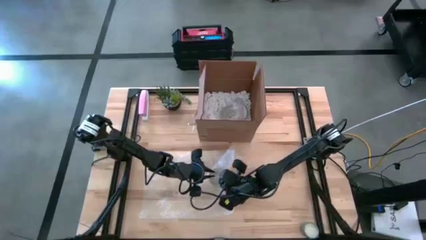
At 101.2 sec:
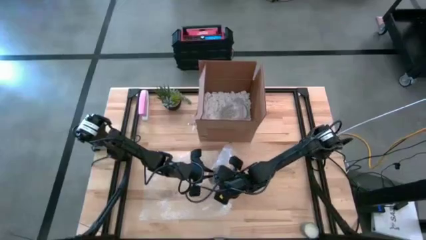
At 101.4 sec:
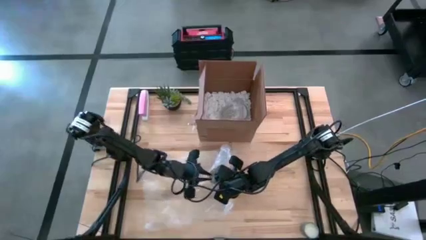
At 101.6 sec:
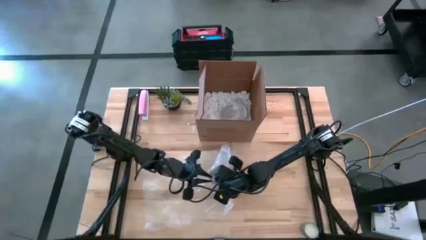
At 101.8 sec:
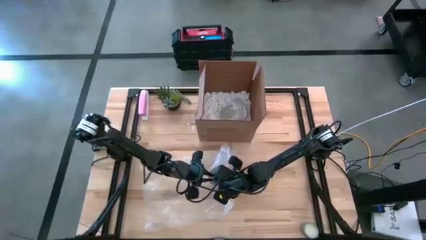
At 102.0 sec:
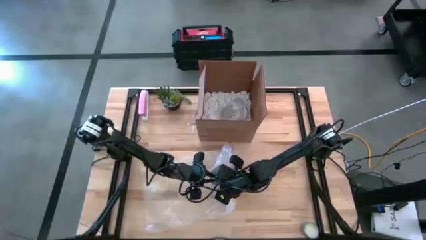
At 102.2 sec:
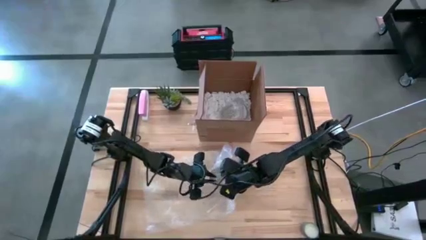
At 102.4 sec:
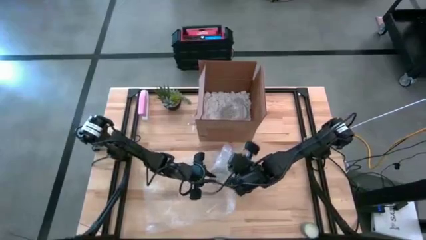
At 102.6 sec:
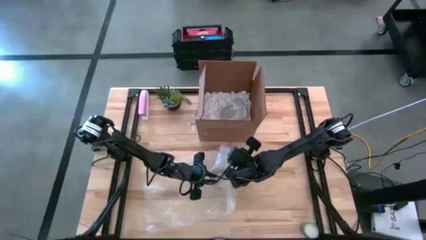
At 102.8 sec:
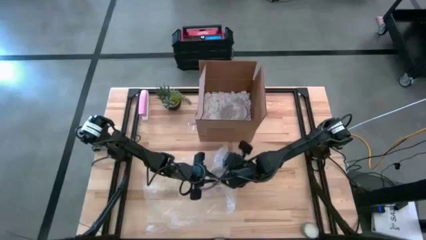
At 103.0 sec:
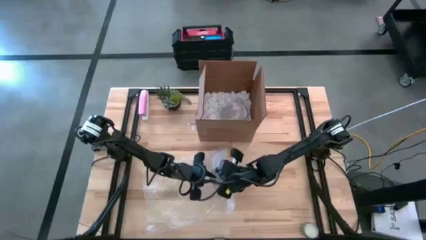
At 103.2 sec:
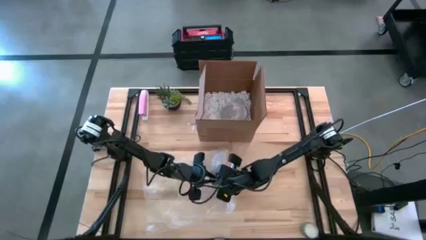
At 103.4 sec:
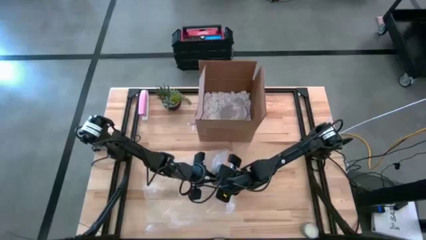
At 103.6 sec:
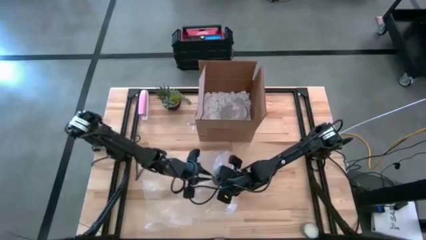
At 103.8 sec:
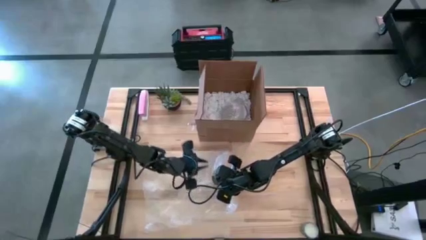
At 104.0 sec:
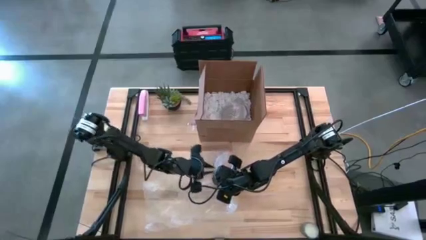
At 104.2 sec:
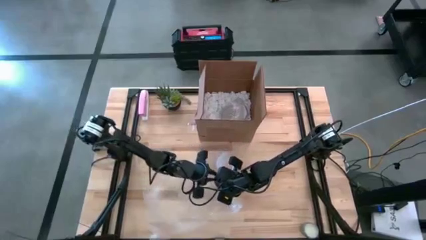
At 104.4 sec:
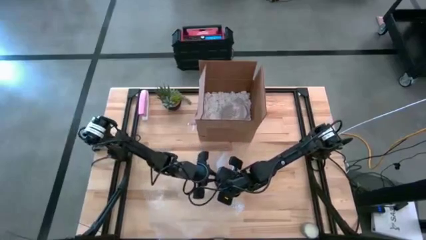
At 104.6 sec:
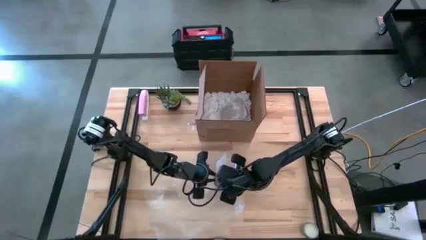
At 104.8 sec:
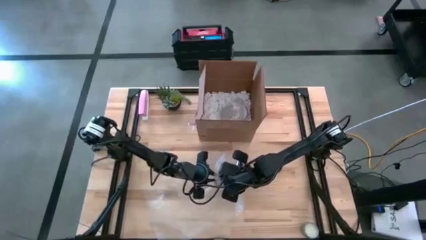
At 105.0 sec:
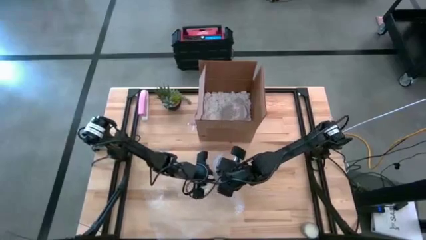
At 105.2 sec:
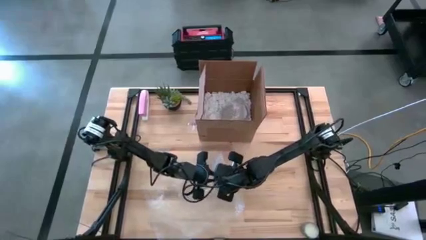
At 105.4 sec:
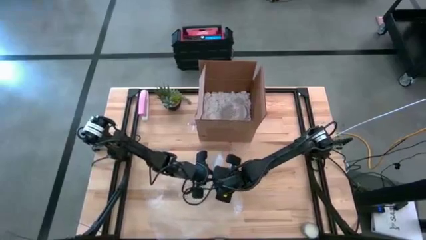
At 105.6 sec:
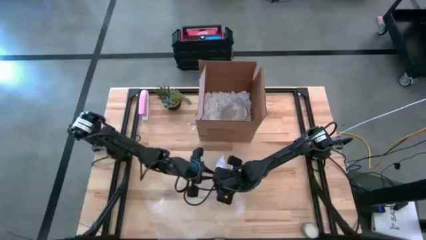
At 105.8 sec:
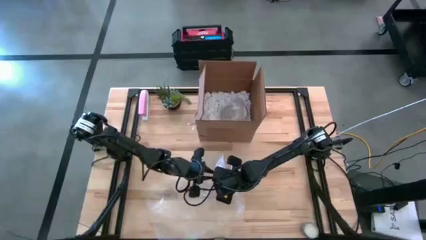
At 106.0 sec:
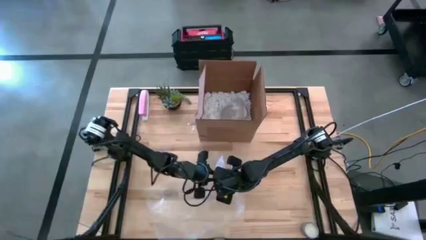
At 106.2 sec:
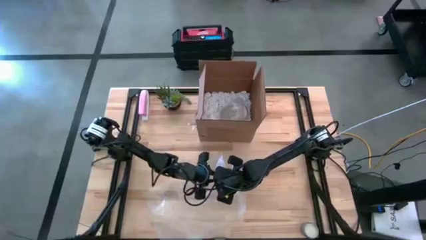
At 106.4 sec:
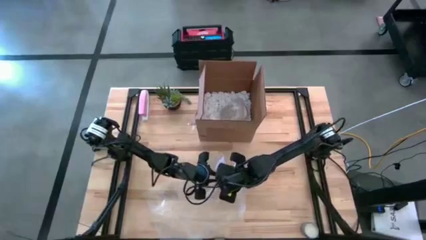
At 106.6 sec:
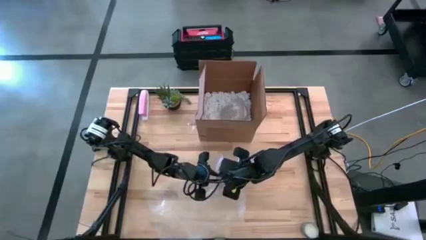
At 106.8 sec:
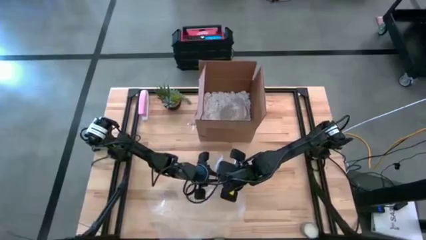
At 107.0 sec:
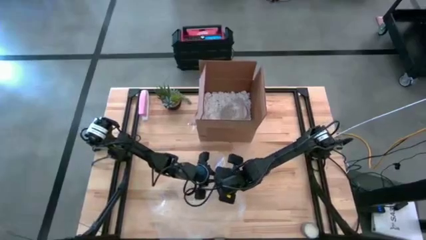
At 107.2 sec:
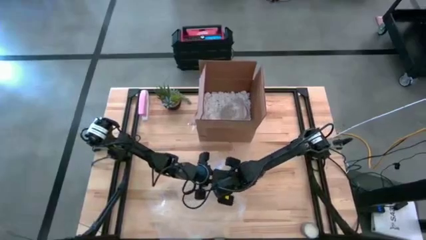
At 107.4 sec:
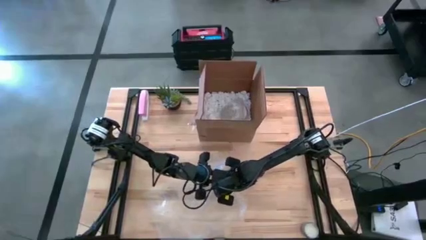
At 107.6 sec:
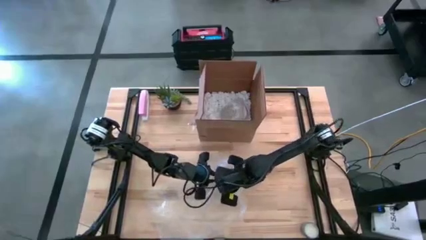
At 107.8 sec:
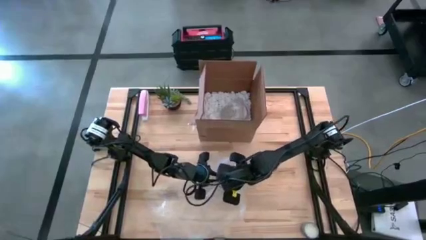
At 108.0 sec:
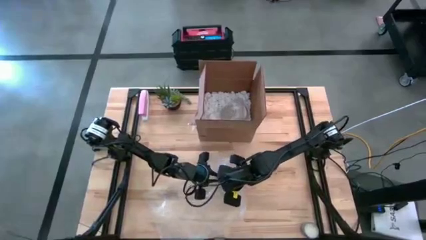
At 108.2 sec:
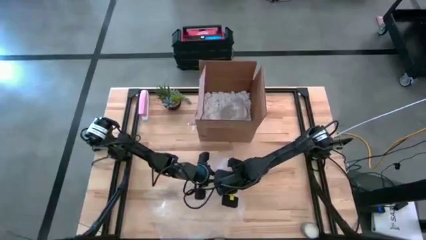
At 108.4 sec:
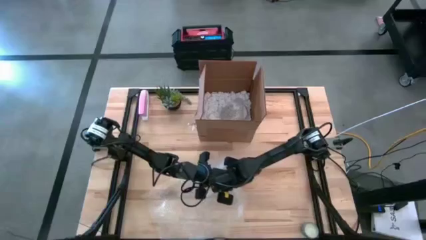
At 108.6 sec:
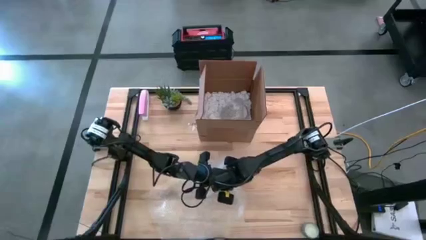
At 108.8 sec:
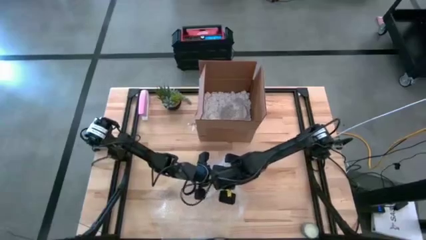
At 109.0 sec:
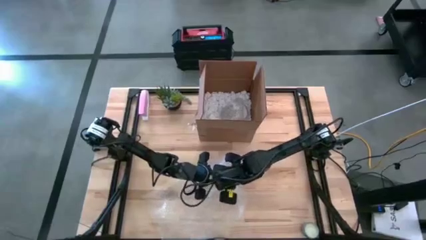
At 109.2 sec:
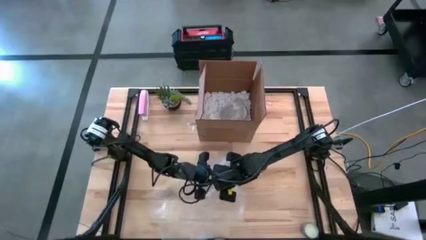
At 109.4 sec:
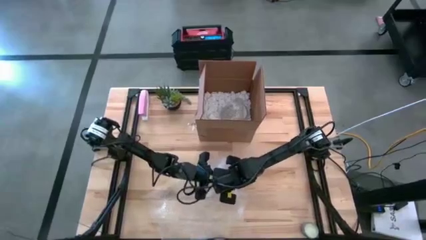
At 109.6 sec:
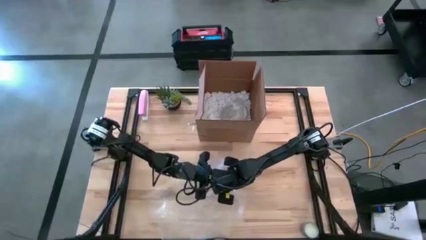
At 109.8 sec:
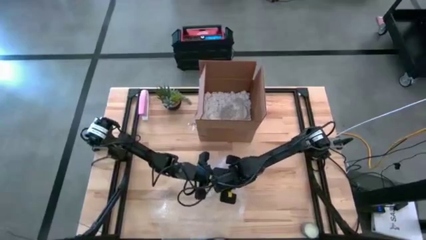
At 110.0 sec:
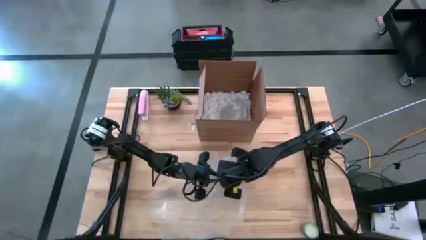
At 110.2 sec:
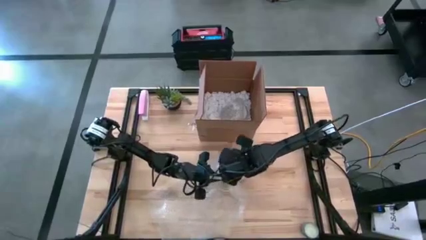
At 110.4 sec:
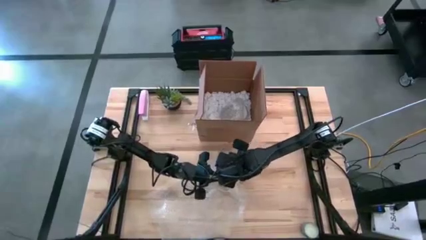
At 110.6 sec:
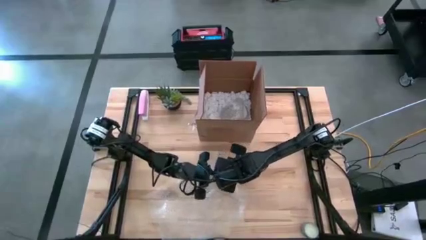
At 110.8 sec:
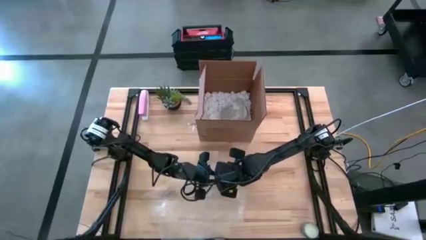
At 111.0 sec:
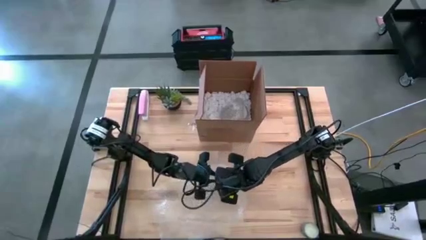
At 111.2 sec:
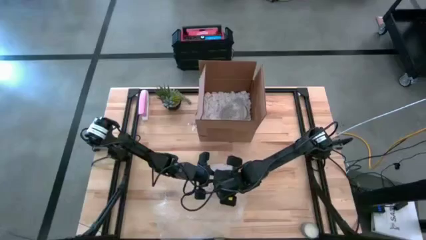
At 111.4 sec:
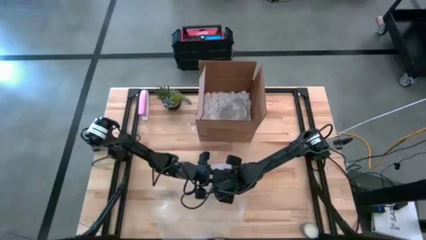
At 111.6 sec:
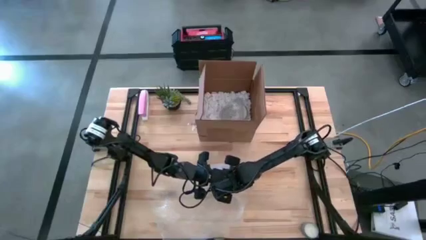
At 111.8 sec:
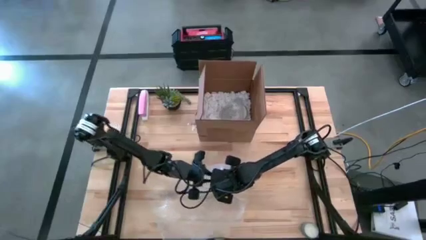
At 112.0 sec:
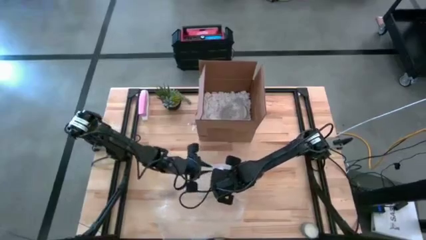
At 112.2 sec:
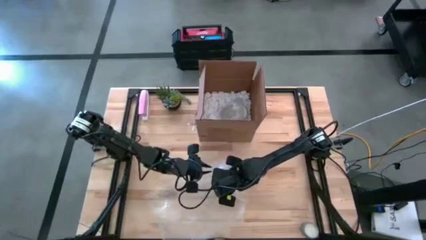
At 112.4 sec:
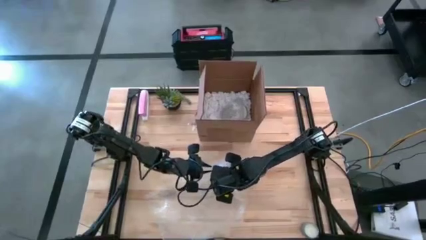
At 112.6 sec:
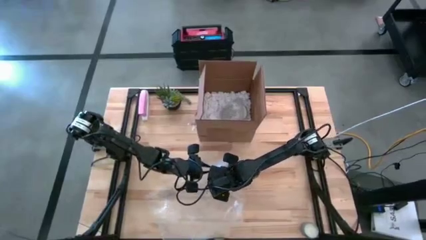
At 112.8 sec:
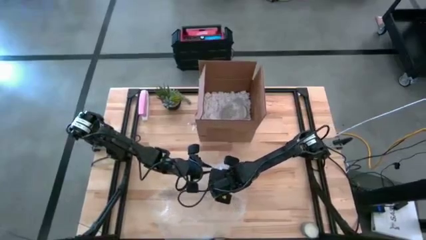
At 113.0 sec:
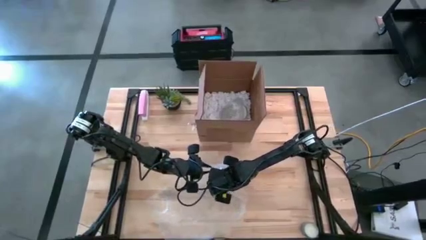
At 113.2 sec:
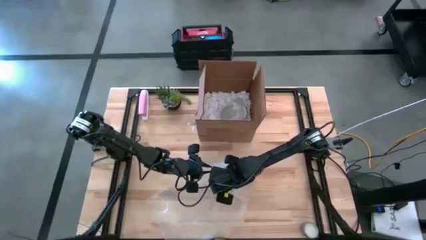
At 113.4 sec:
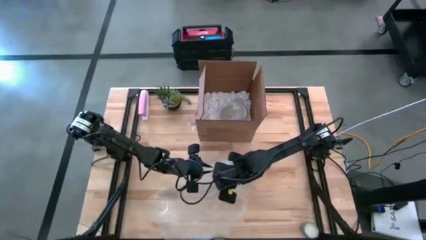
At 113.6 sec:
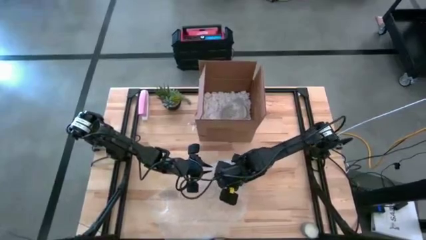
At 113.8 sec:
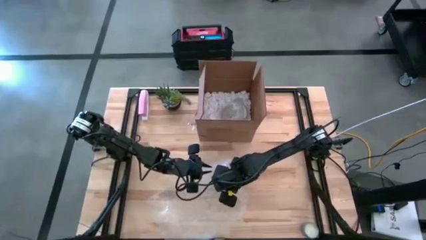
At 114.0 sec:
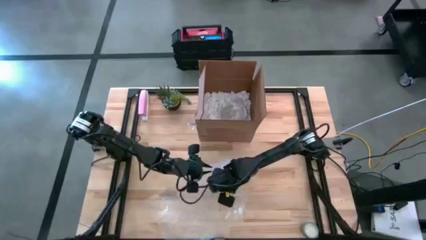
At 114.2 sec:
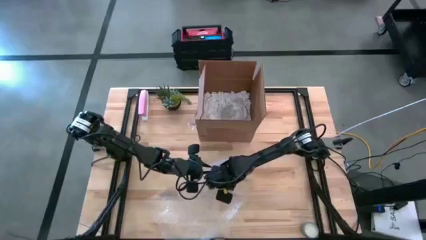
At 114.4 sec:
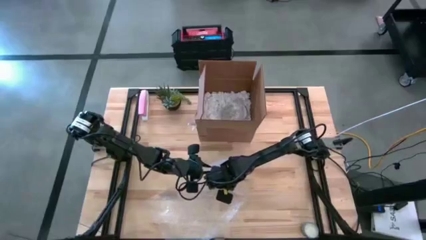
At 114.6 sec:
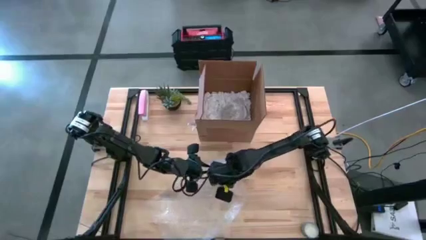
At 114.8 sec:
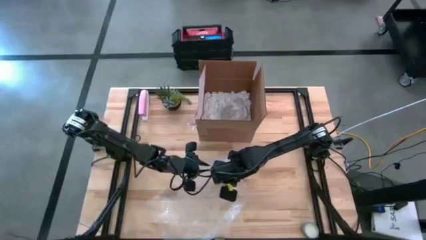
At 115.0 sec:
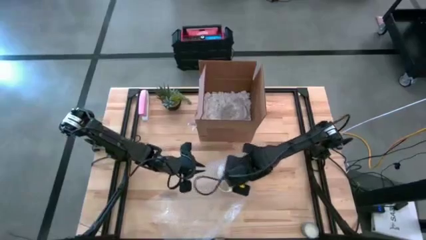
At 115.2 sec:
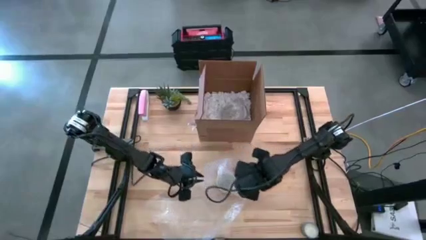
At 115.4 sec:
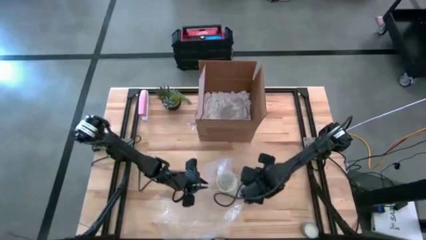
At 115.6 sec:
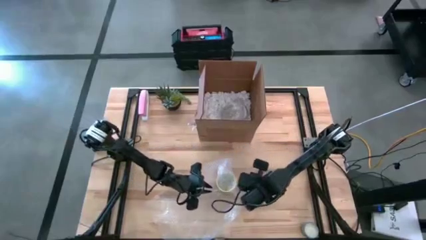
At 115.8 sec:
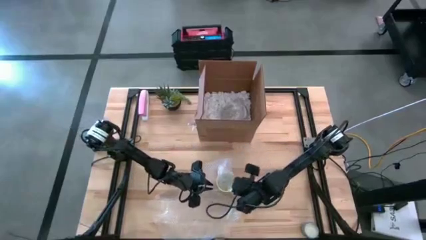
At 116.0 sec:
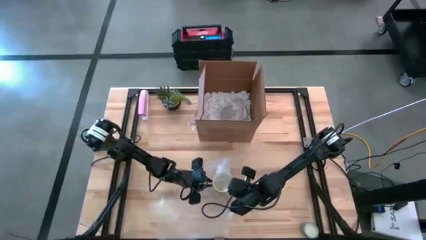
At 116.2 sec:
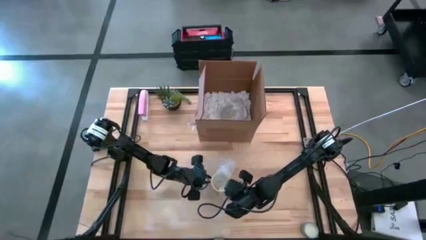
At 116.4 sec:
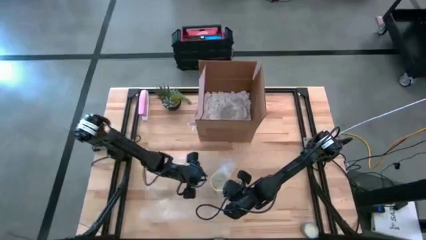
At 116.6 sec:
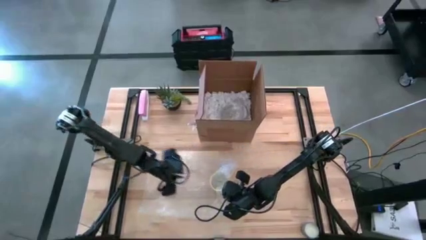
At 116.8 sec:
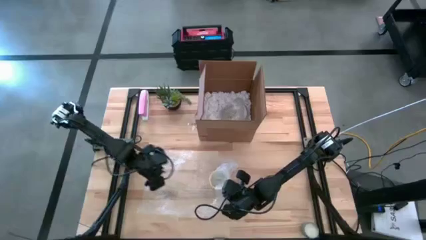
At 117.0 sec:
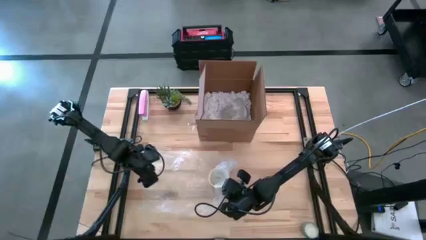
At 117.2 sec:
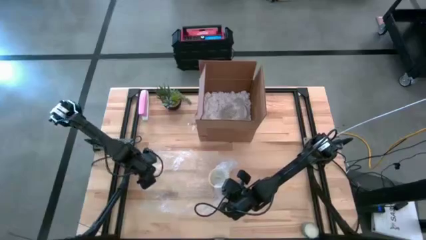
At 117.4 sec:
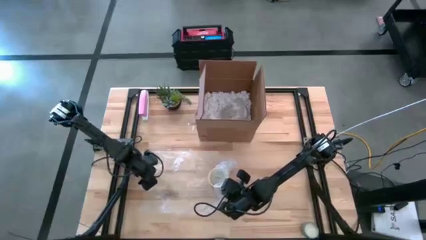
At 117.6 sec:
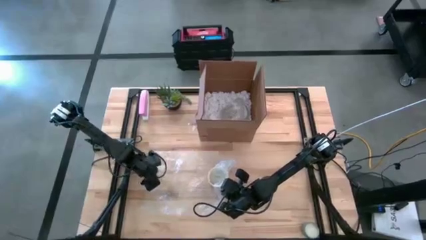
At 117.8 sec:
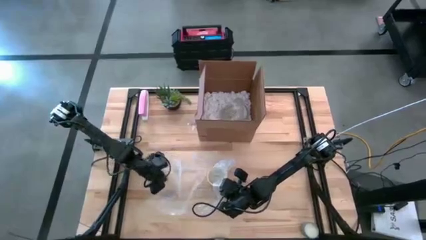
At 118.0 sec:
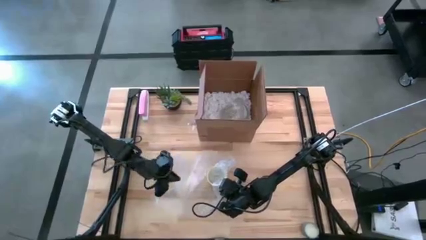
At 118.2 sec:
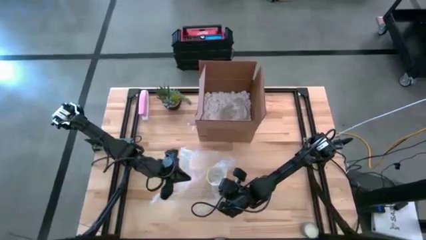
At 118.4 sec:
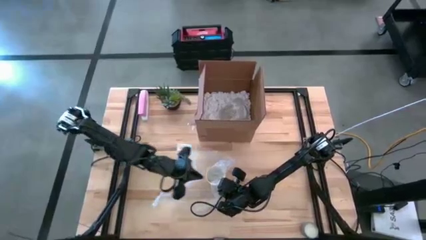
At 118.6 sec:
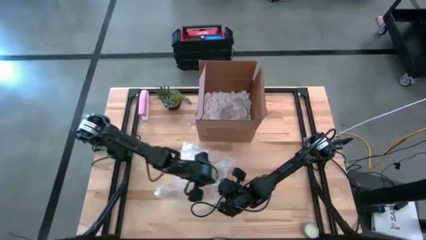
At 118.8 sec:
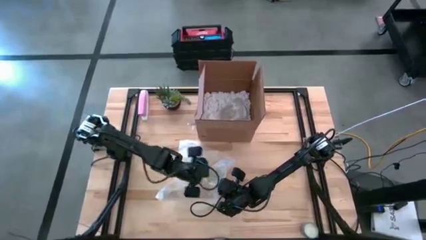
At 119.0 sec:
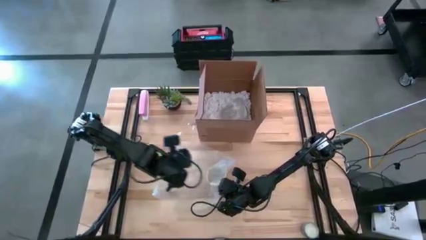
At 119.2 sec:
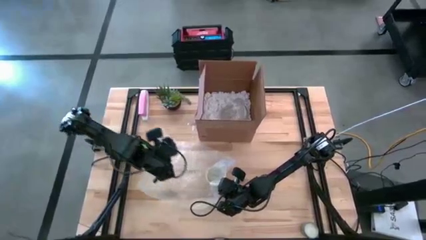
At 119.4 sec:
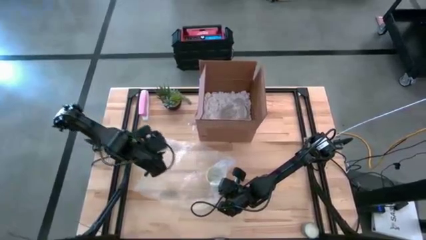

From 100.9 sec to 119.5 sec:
Task: wrap mug
Wrap the orange mug with bubble wrap
